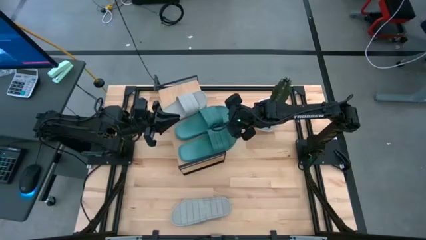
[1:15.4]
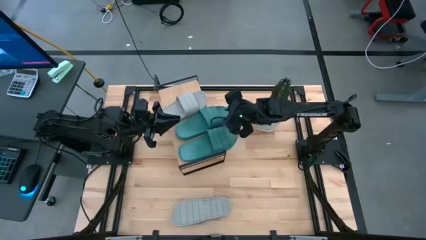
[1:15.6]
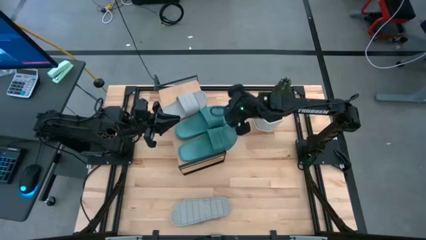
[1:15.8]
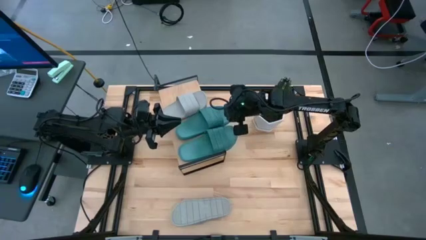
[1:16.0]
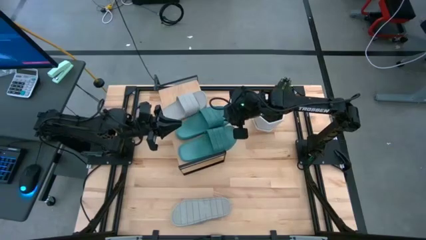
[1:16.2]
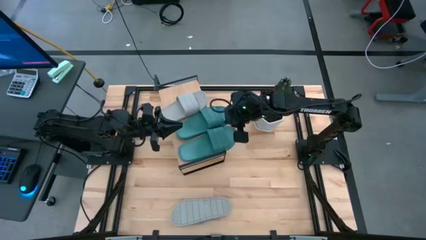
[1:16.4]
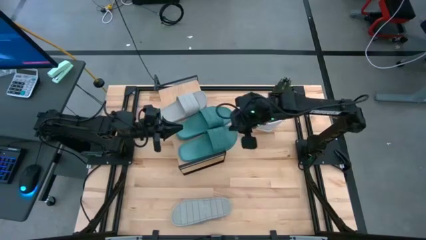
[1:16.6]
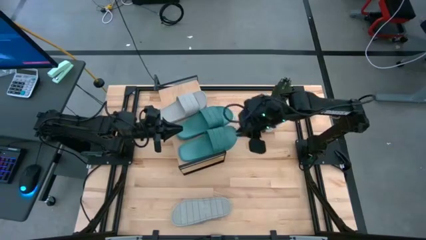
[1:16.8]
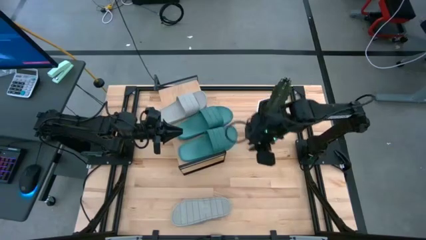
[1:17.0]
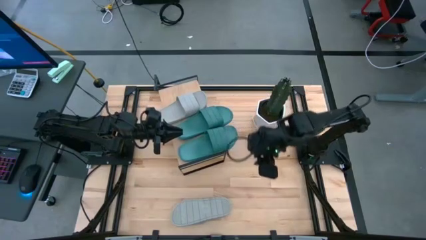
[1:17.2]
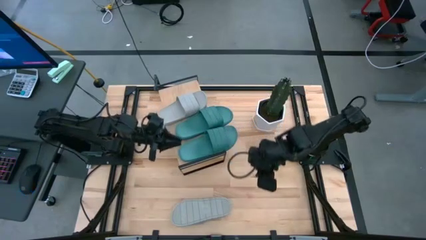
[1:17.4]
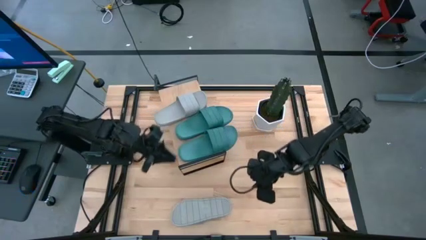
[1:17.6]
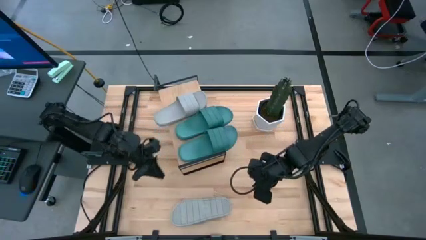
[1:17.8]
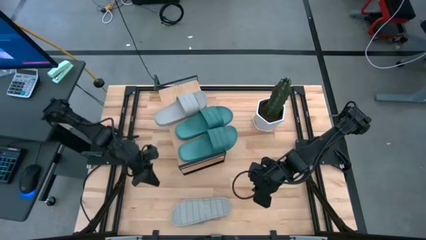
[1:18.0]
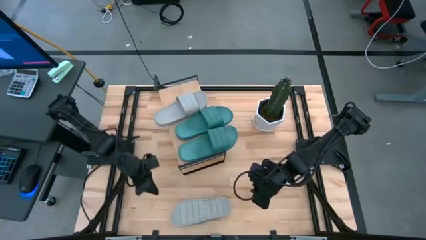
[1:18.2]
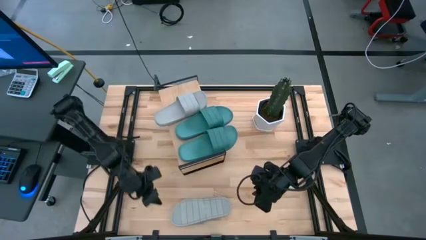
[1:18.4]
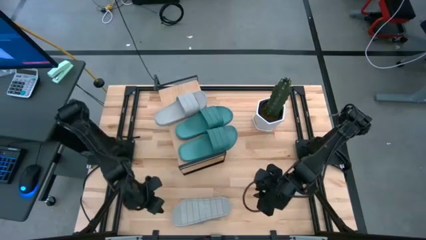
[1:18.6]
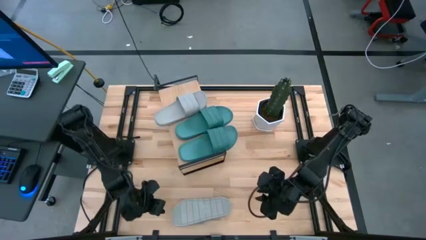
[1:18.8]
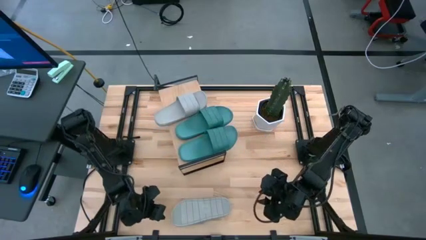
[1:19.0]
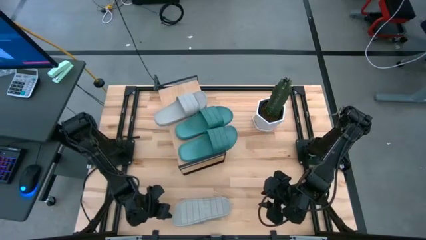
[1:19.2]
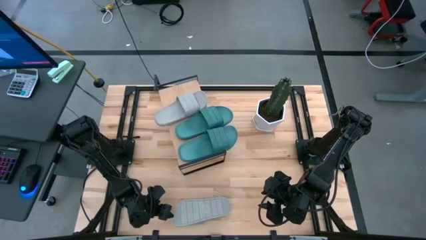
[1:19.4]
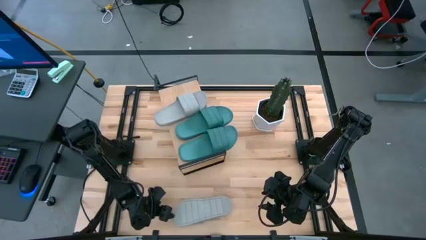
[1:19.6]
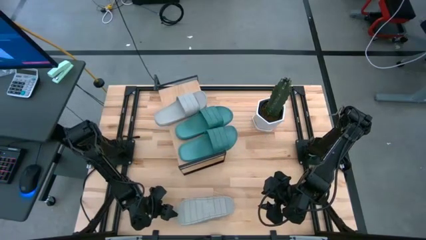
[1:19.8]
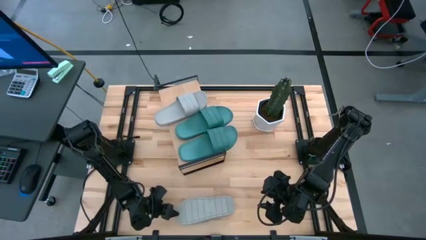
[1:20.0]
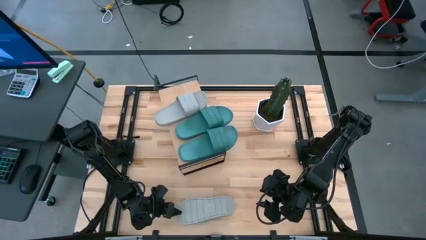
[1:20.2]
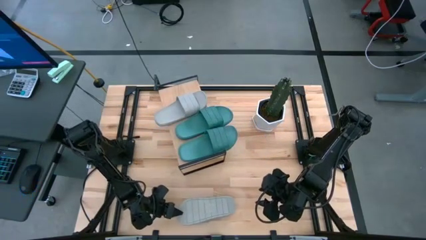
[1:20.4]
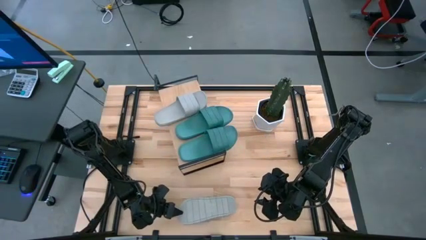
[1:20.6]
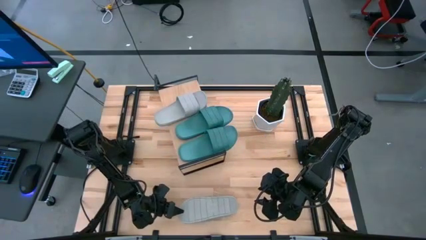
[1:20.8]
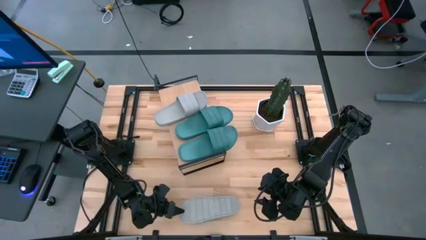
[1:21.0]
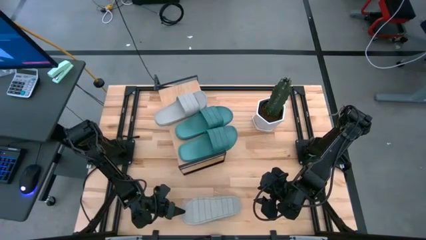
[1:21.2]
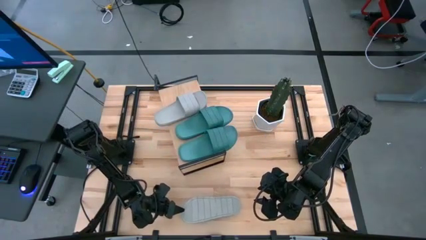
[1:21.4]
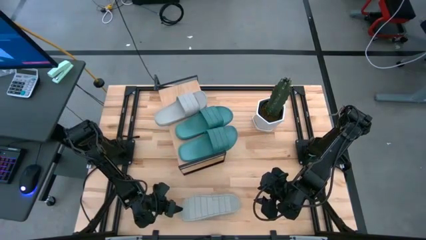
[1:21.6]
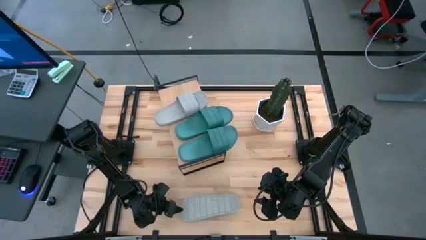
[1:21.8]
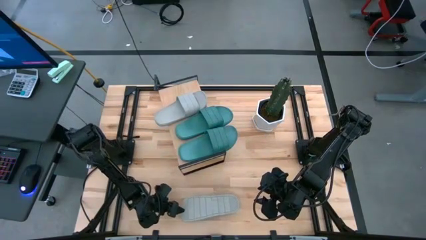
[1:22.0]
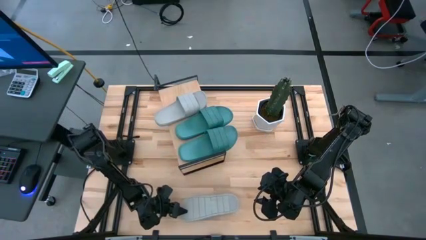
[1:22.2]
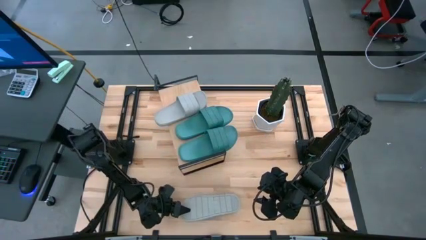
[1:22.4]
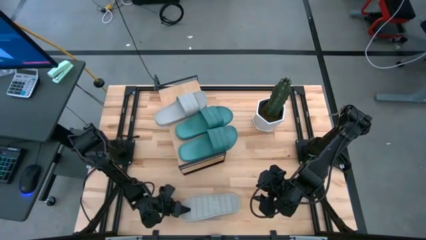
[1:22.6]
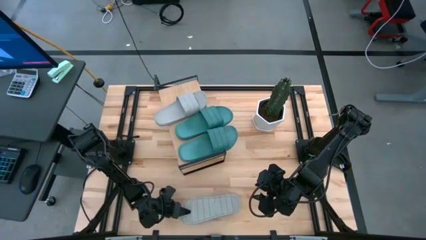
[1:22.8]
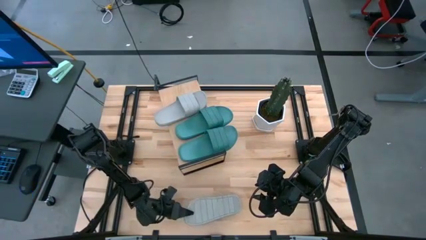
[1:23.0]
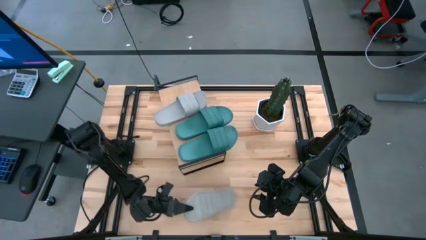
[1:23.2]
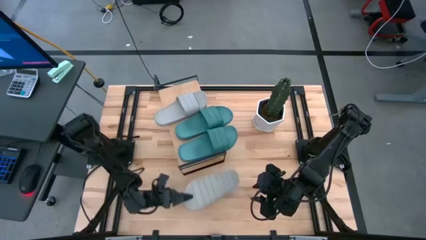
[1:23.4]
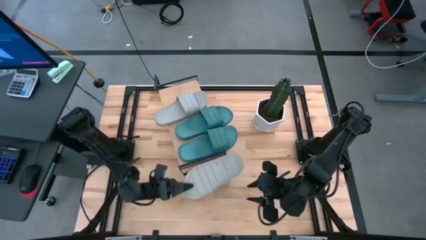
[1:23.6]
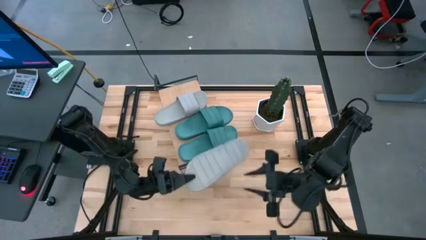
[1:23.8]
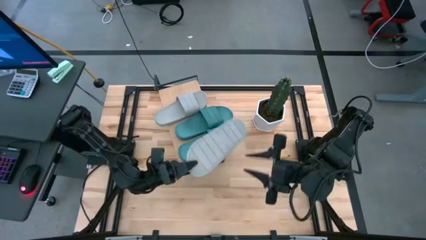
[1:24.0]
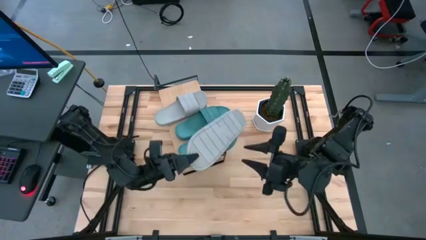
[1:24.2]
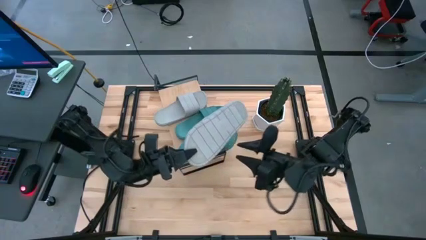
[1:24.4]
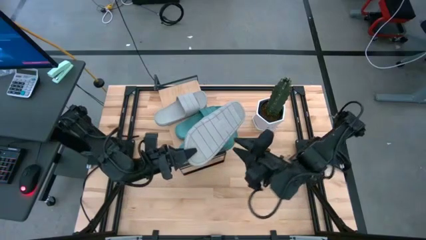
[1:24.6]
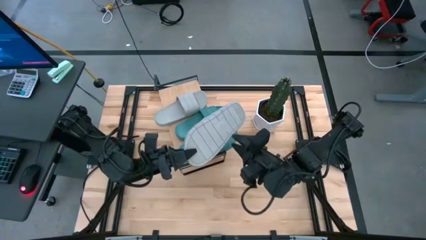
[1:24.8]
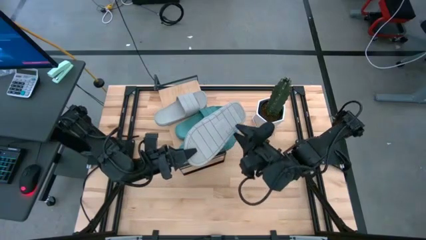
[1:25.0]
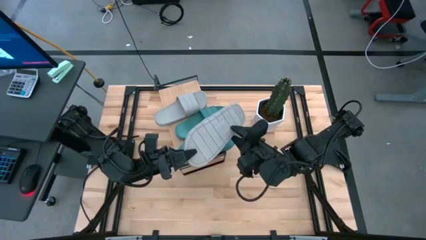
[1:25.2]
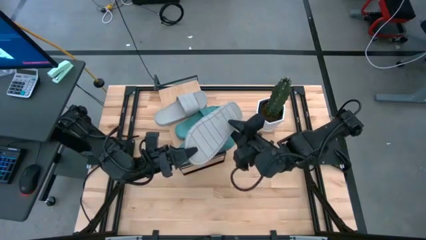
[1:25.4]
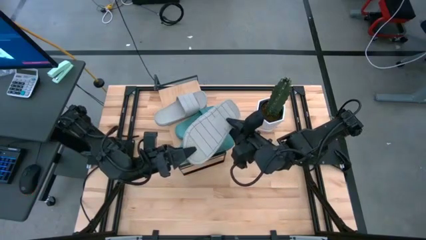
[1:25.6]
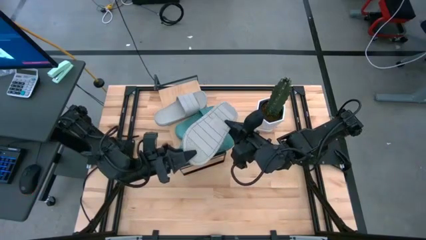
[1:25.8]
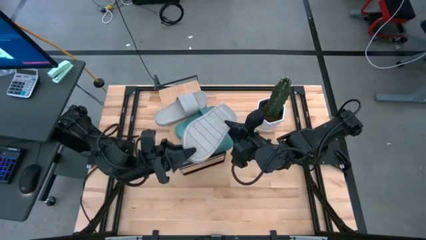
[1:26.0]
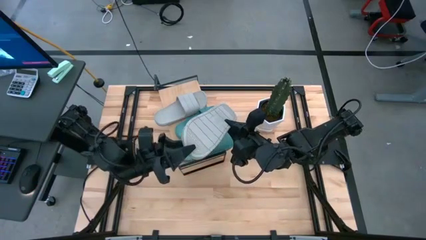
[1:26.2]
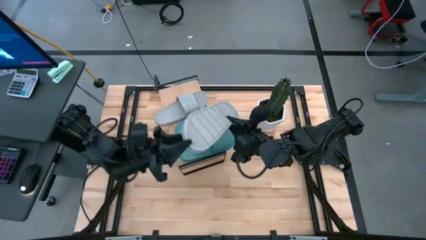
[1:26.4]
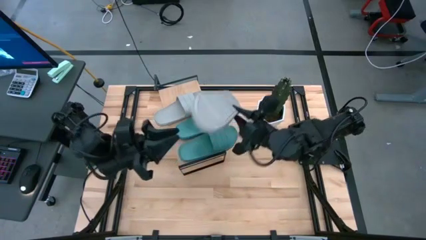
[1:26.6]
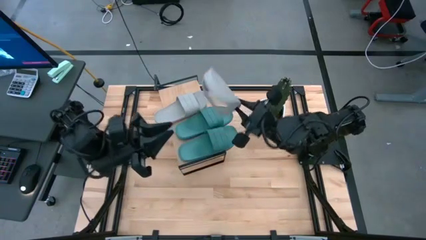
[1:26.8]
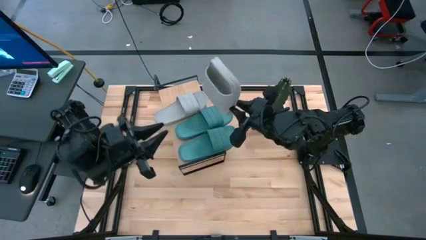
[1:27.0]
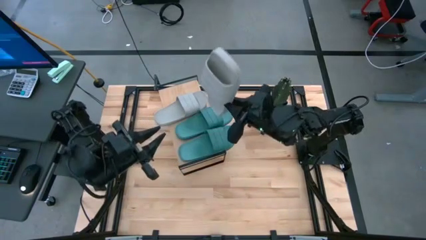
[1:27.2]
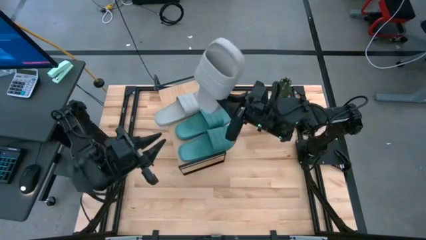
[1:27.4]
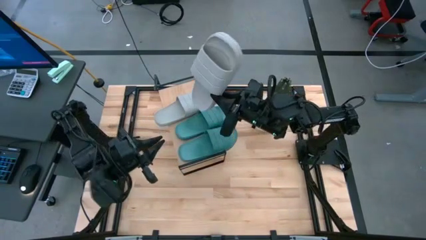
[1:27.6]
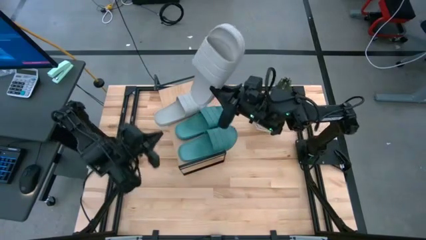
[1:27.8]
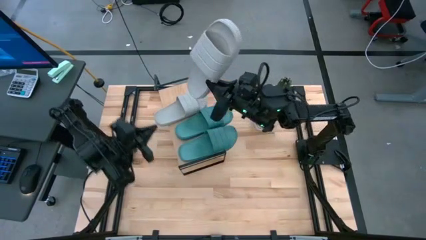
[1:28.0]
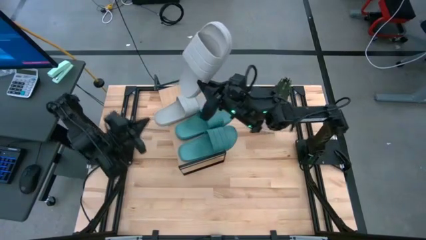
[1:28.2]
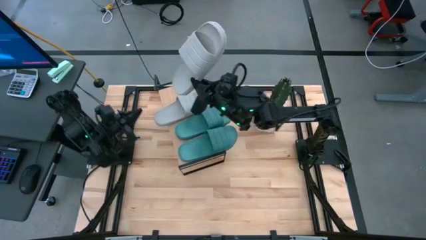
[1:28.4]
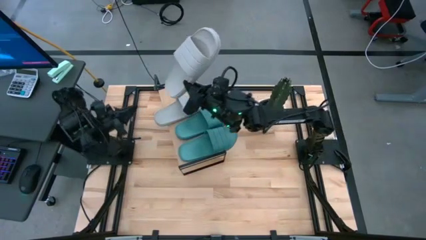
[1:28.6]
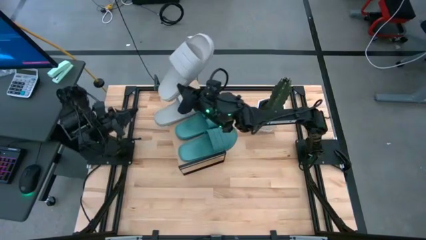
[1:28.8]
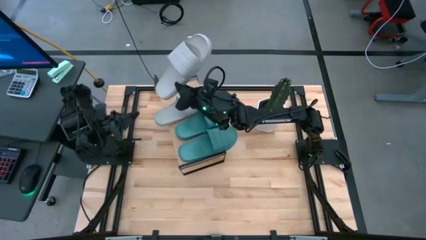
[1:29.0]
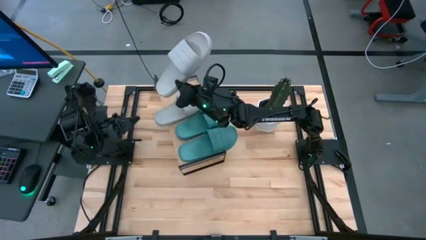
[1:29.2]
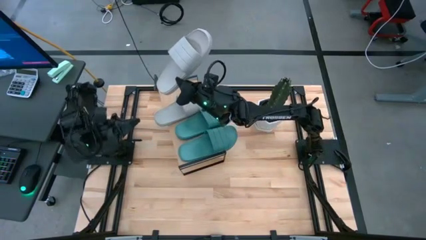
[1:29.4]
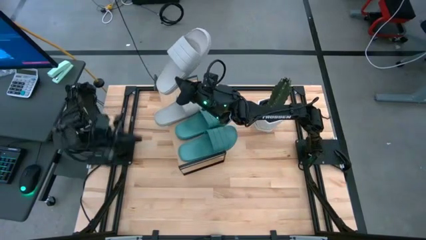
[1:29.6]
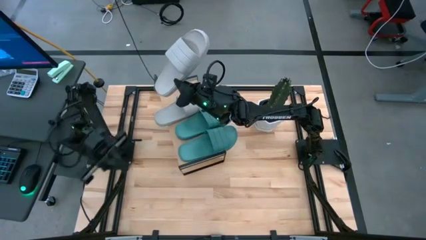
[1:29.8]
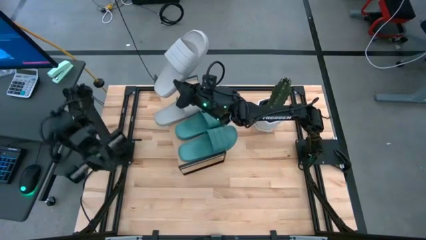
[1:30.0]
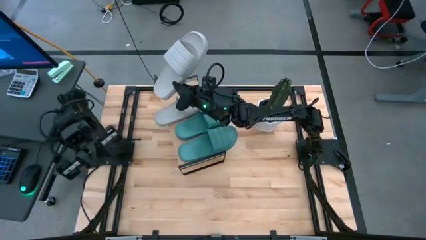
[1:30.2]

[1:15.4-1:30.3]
Task: Pick and place slides into the shelf
Put the white slipper on the shelf

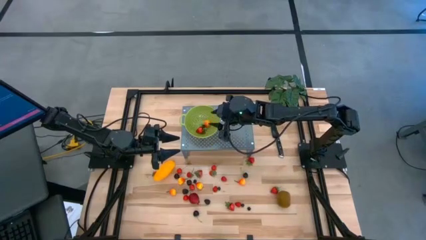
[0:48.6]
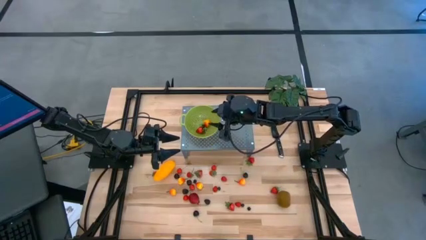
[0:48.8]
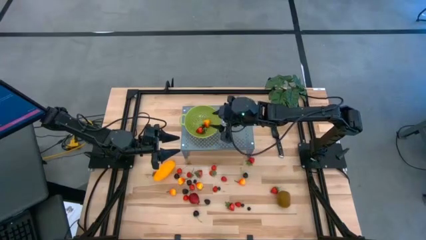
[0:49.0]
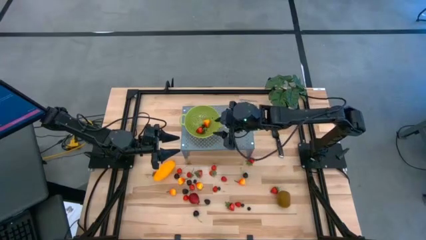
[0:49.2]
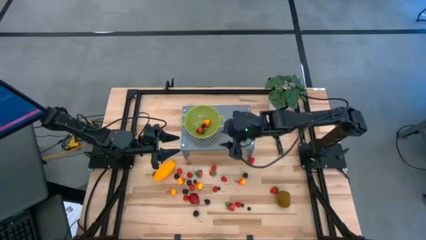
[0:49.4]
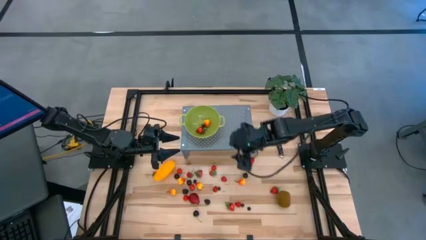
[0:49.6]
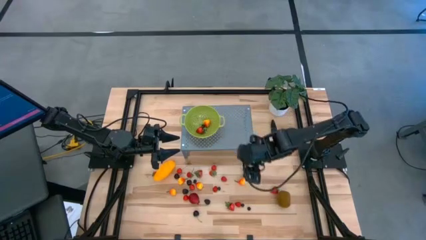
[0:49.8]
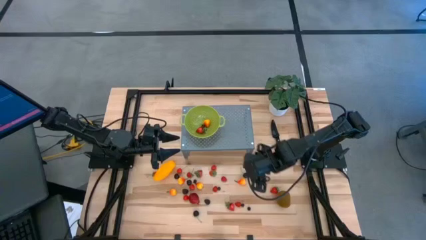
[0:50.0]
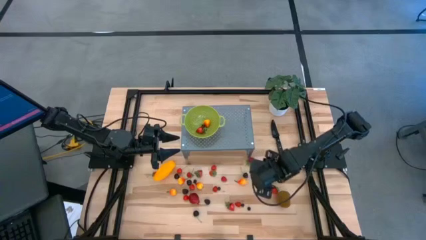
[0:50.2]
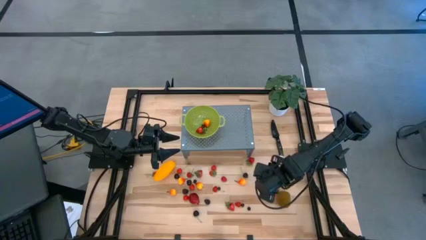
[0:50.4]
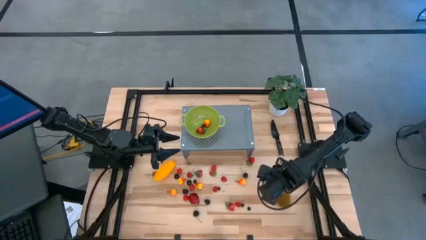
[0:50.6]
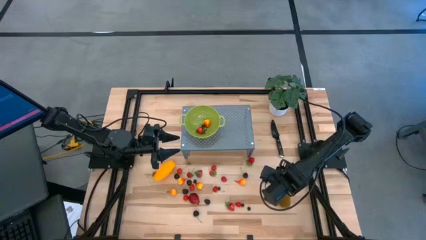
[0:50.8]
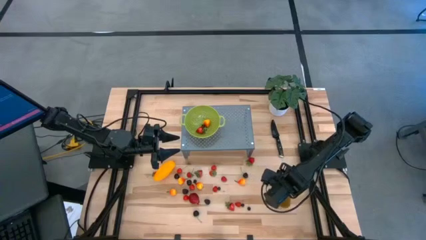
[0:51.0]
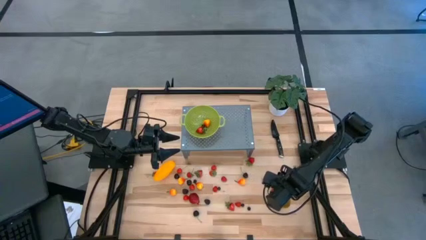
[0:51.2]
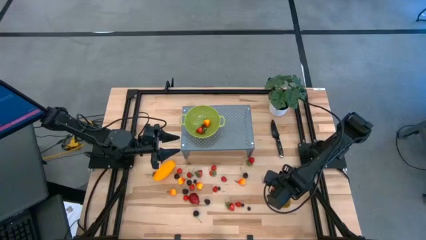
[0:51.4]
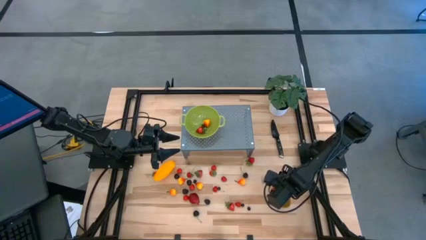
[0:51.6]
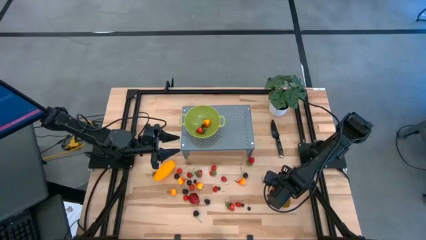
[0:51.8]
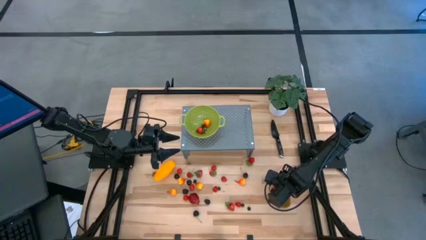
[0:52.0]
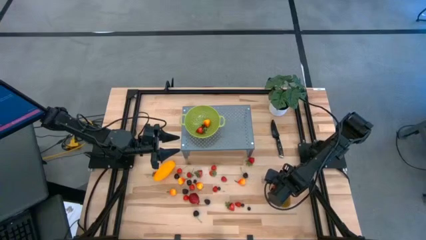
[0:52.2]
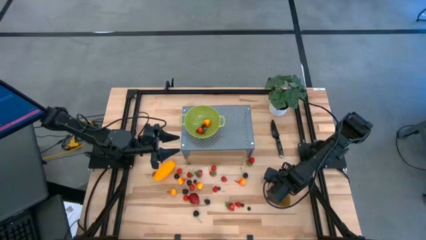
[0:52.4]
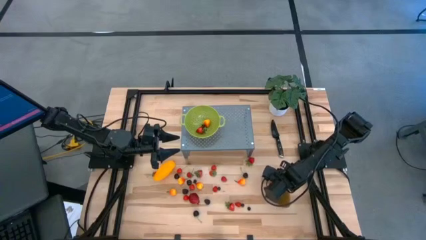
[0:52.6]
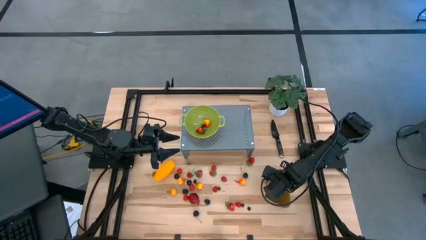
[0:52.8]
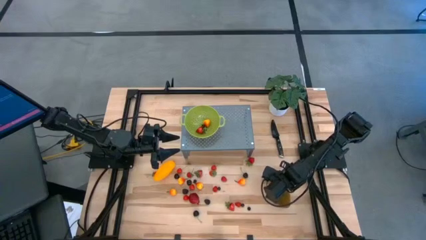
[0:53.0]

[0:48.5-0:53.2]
Task: Pick & Place Fruit
Put the strawberry into the green strainer bowl on the shelf
